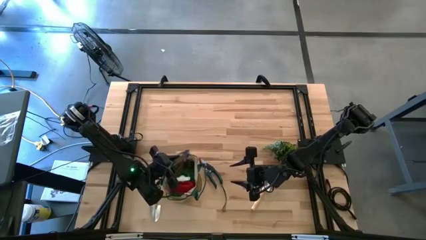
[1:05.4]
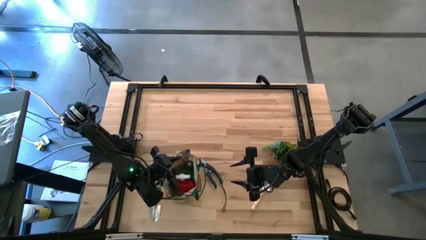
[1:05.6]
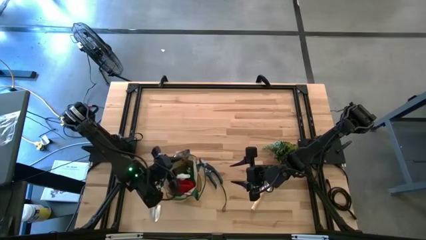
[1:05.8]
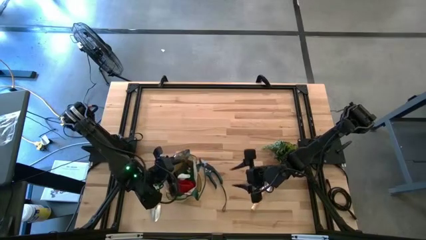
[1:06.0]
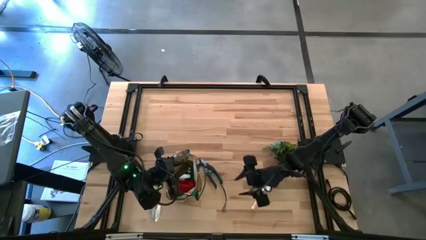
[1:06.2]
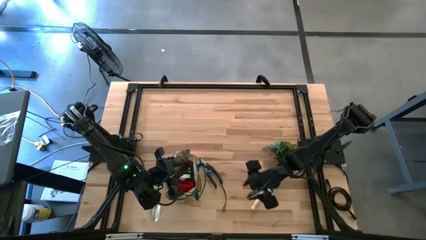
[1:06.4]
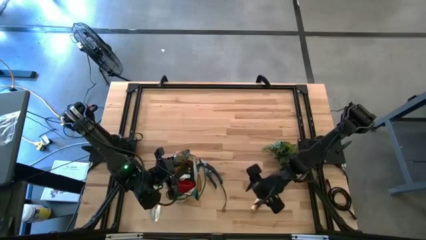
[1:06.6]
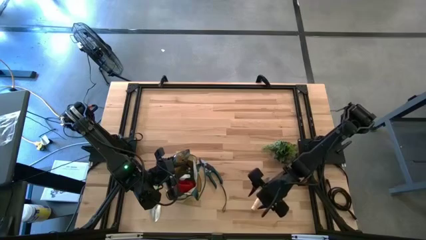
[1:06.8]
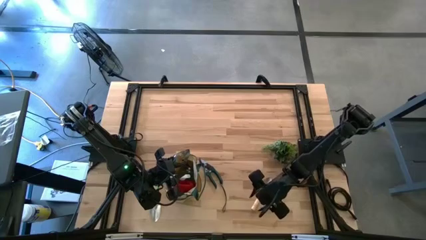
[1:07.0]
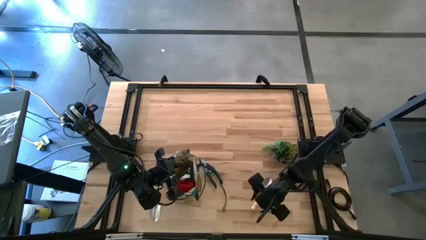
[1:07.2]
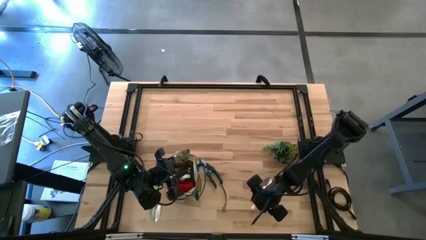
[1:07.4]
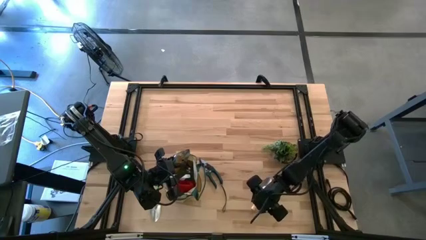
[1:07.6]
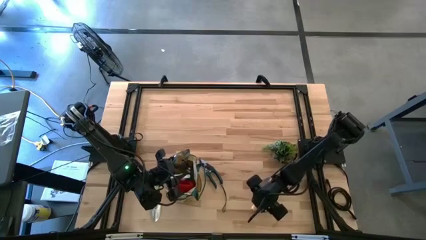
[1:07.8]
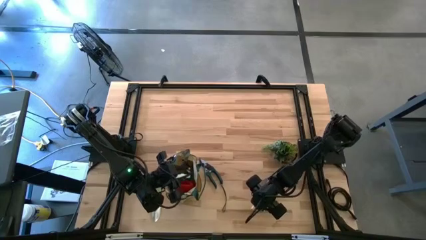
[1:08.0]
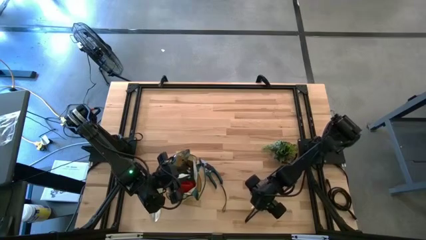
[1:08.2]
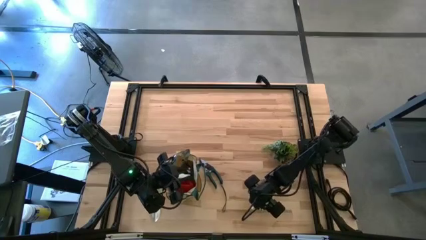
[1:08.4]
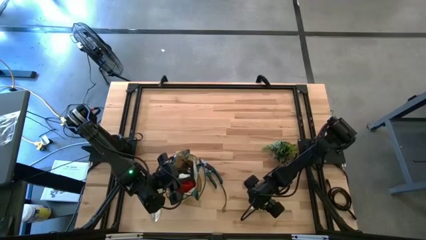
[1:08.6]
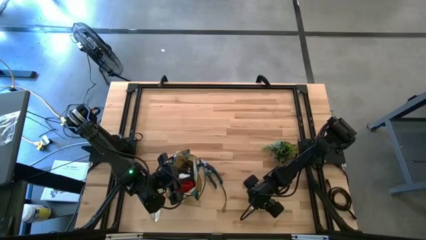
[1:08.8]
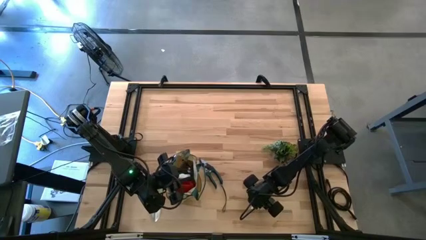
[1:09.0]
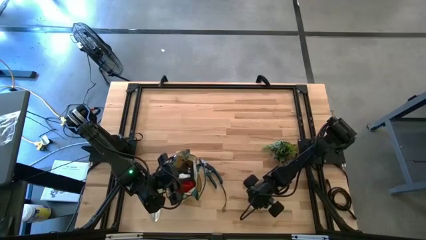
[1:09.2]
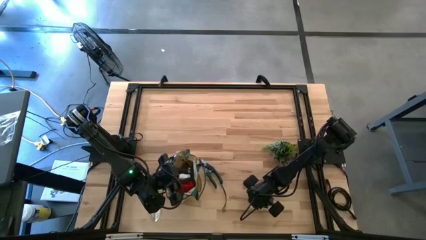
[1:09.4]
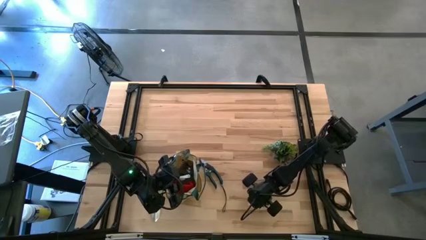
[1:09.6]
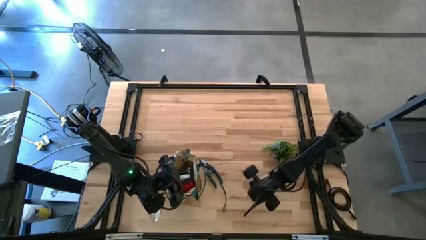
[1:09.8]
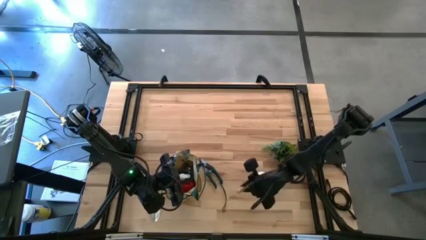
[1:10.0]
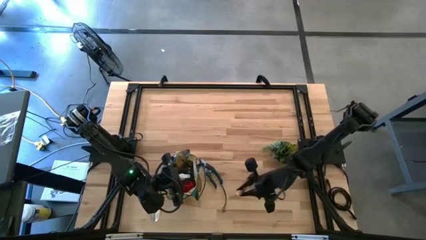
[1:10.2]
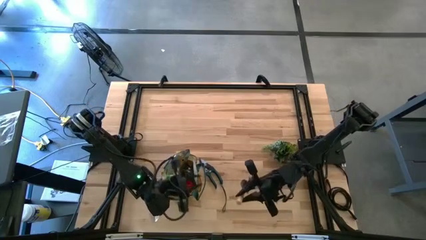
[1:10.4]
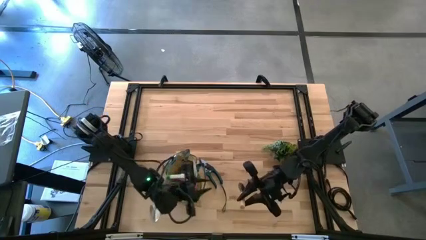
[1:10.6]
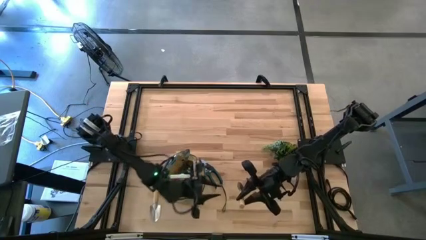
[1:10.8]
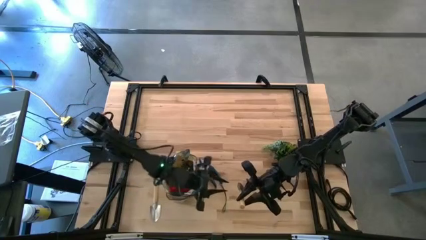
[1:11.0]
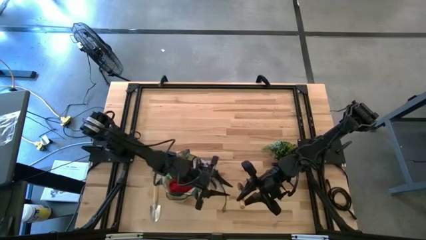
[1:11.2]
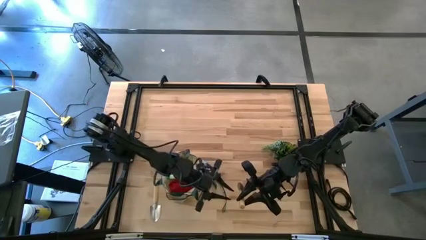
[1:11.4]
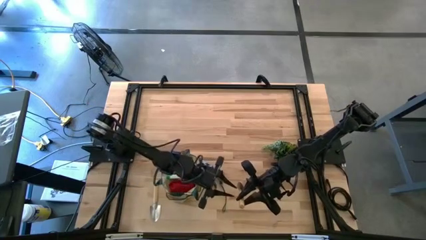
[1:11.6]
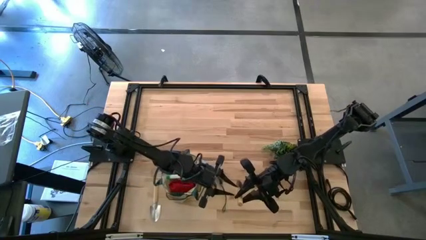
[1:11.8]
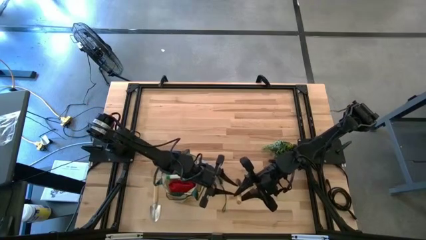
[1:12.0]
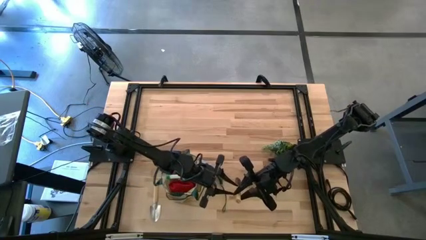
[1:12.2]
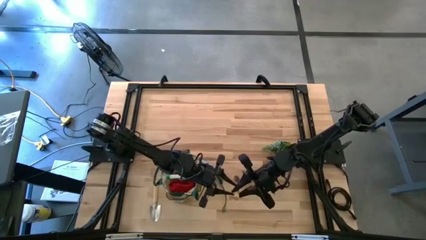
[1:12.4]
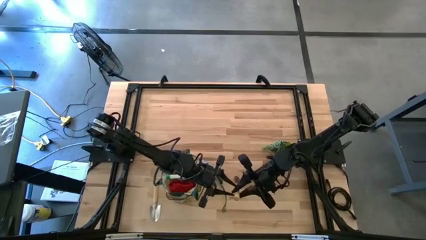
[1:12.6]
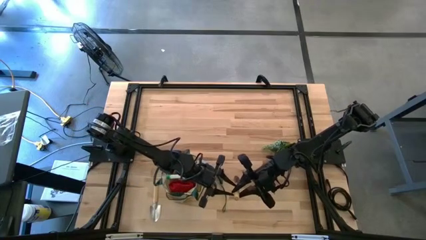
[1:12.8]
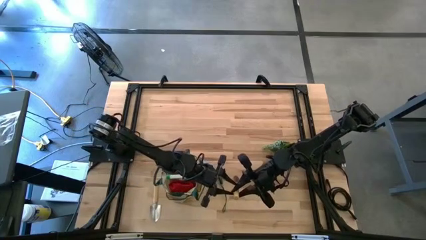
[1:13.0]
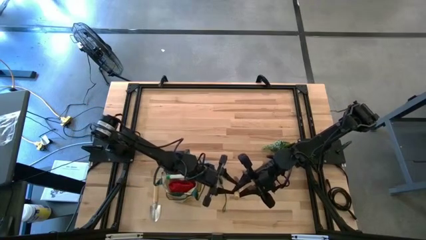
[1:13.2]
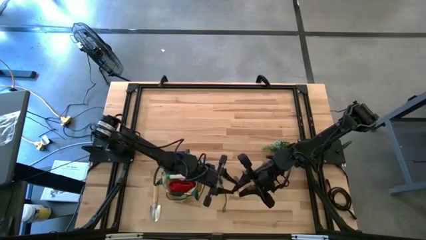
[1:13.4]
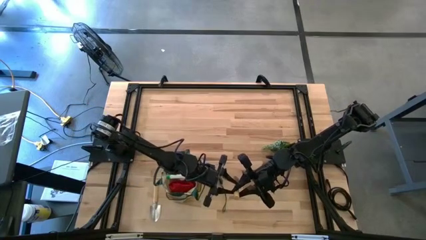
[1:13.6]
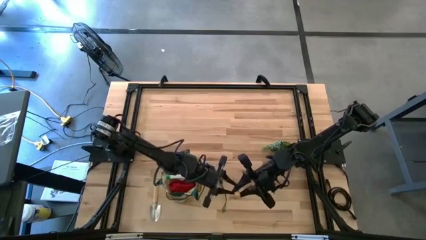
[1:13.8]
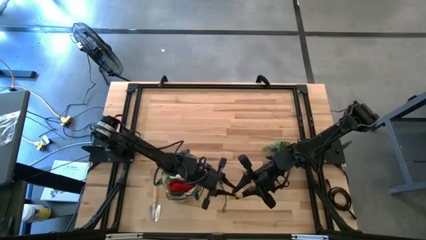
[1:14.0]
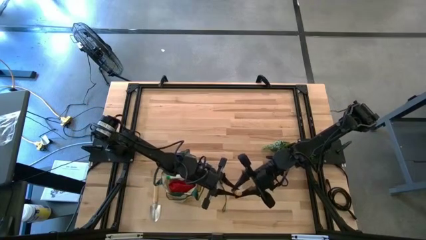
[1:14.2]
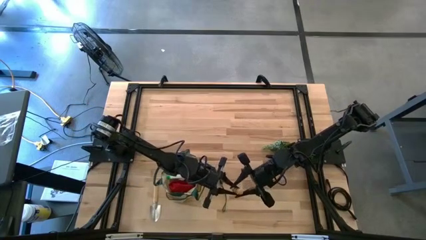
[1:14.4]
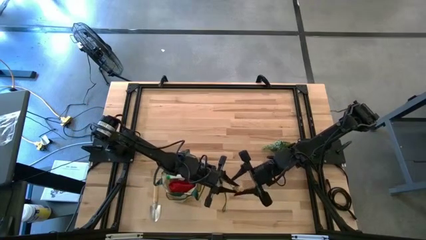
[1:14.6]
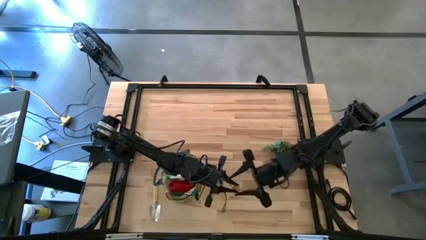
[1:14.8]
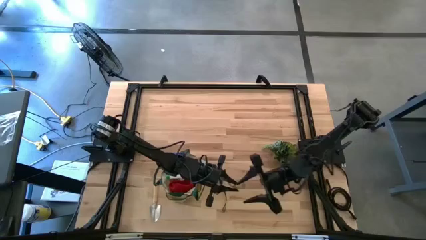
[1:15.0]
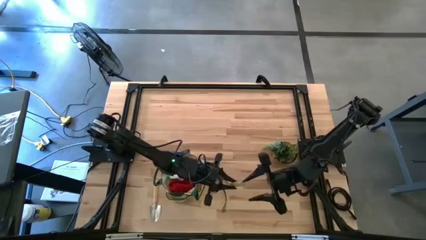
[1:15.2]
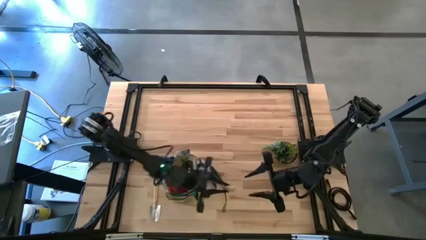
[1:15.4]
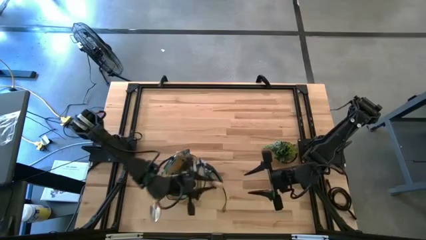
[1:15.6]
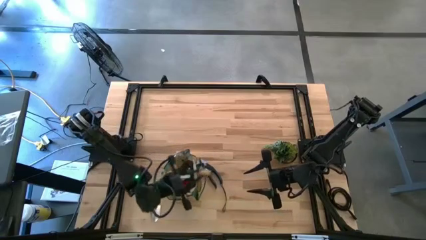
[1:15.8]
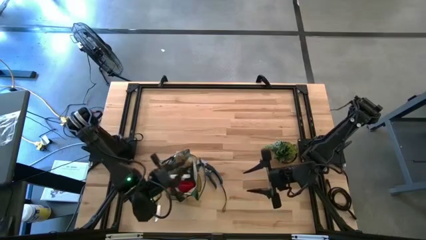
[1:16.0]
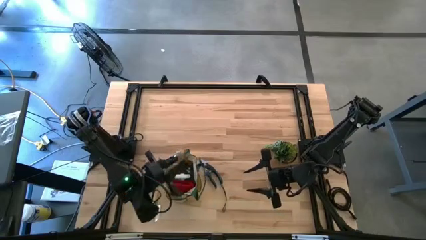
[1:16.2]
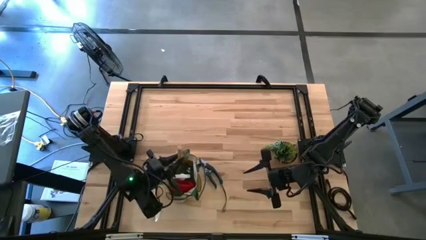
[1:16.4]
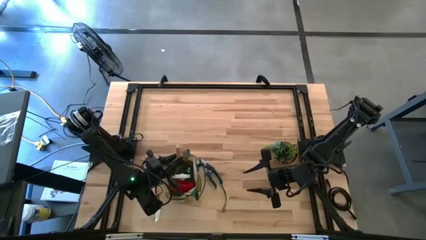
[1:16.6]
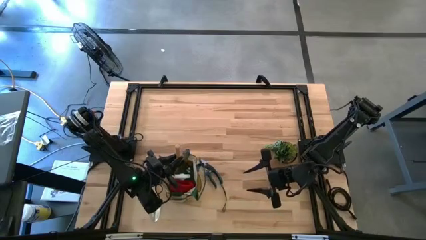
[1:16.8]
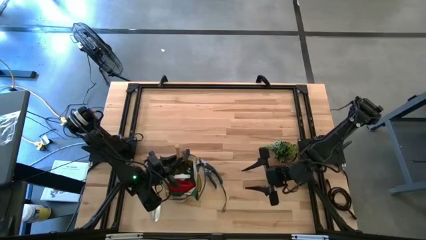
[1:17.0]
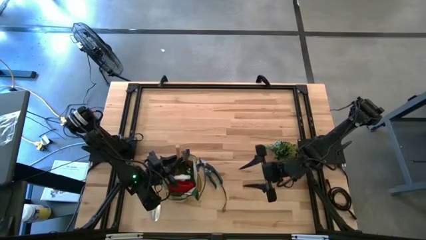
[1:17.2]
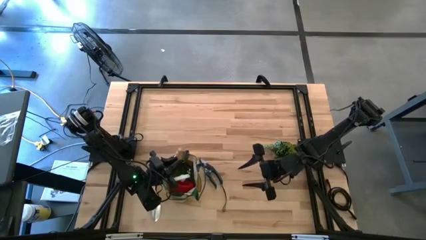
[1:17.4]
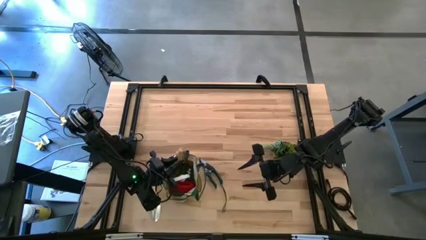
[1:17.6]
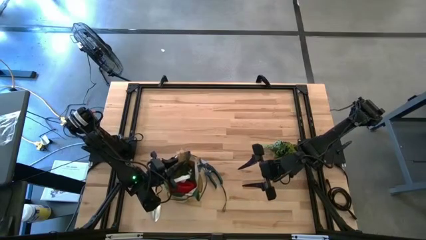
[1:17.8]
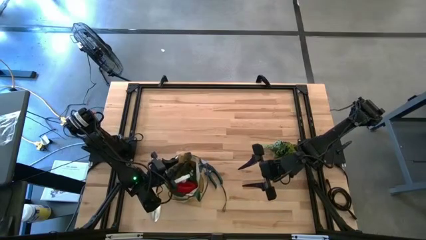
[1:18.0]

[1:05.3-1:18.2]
Task: Pick & Place Garden tools in Gardening bag
Put the right brown trowel into the brown gardening bag

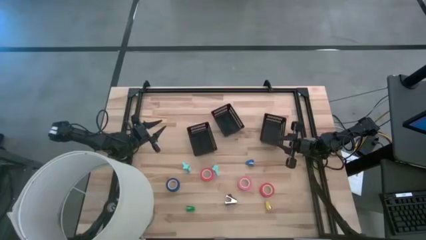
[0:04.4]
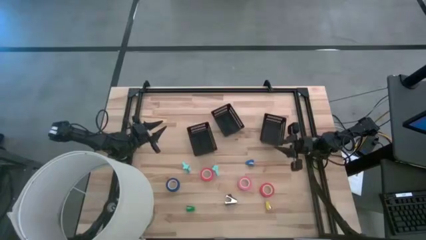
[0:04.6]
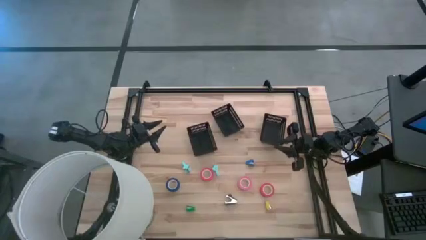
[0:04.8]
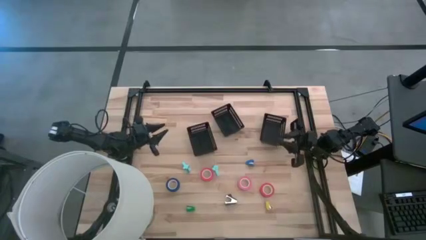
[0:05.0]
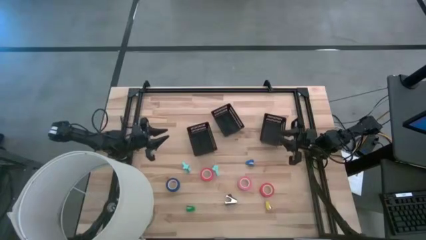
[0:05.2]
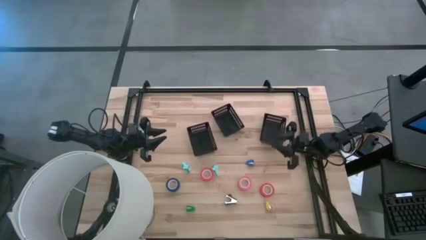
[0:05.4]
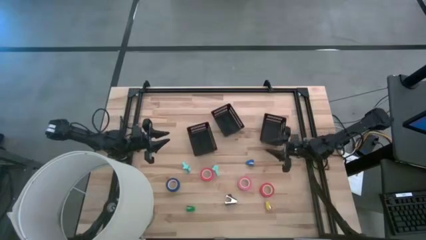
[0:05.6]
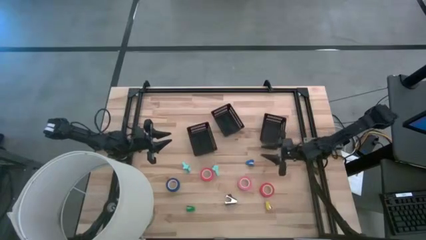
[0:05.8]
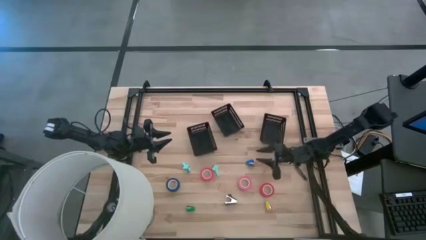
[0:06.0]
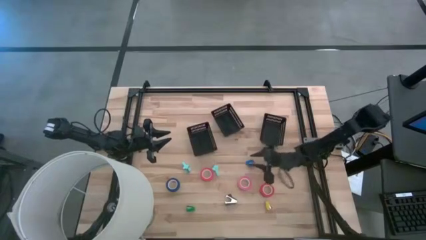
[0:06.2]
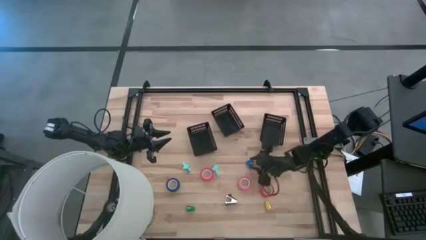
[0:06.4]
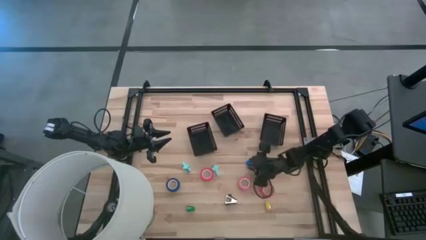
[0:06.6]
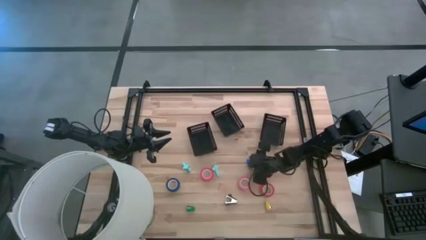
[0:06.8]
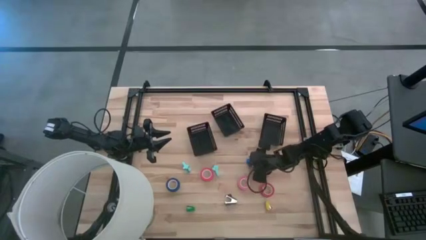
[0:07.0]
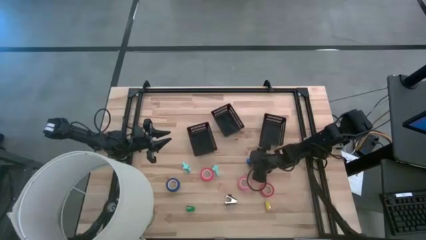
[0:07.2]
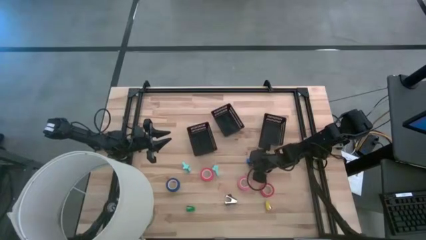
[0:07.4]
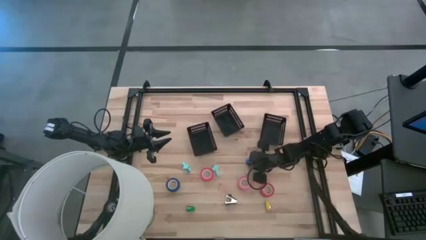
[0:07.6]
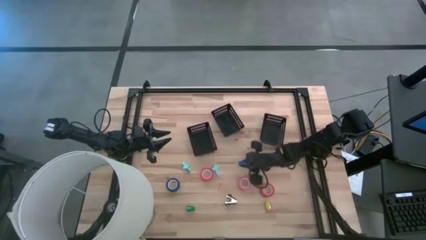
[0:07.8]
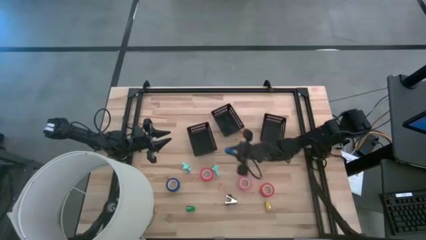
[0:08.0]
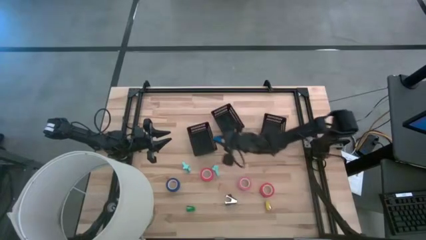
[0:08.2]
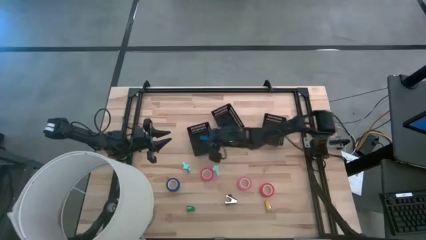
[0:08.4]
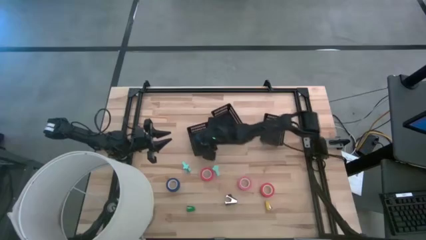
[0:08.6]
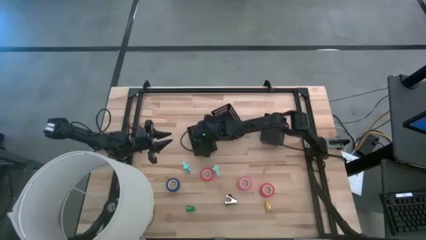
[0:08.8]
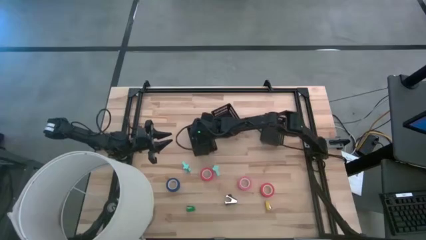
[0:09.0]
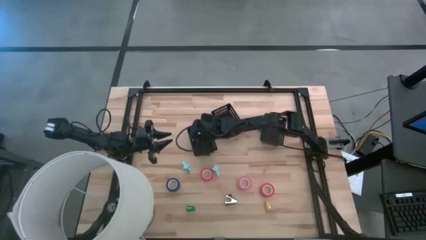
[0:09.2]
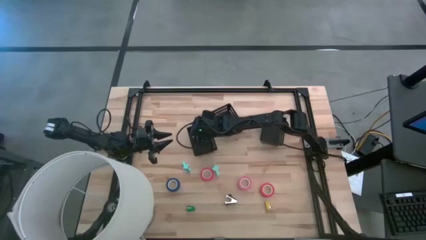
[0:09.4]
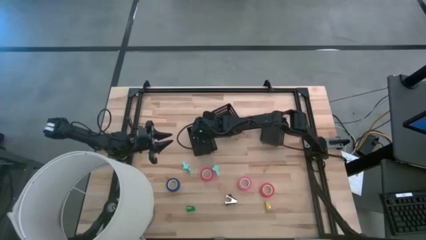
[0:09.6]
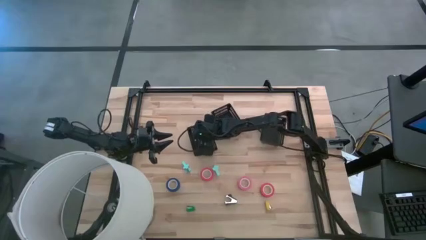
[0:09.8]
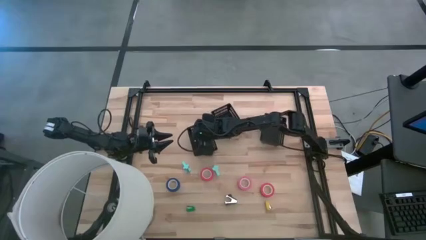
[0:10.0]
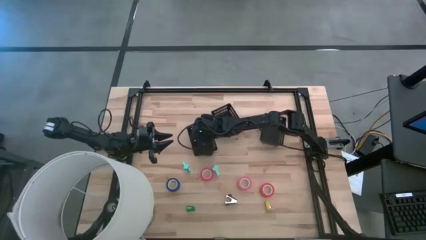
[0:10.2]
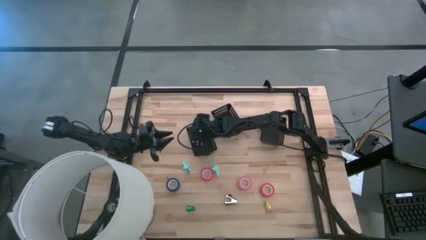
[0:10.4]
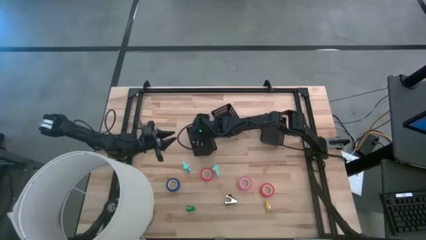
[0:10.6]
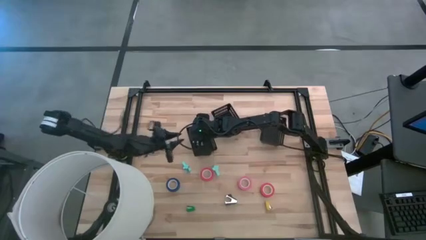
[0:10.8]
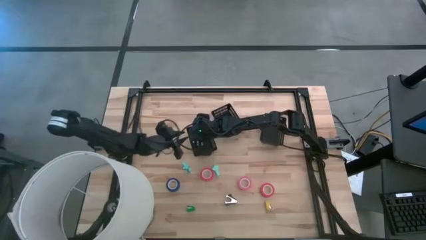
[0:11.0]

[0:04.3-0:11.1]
Task: Pick and place Stapler, Stapler remover, tape
Put the blue stapler into the left black basket
